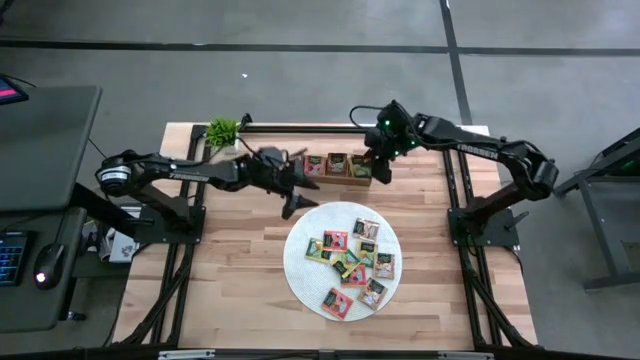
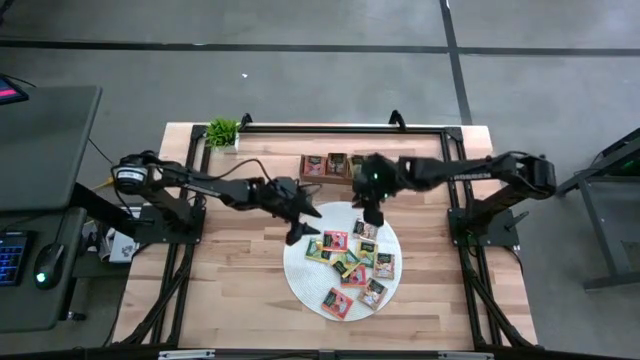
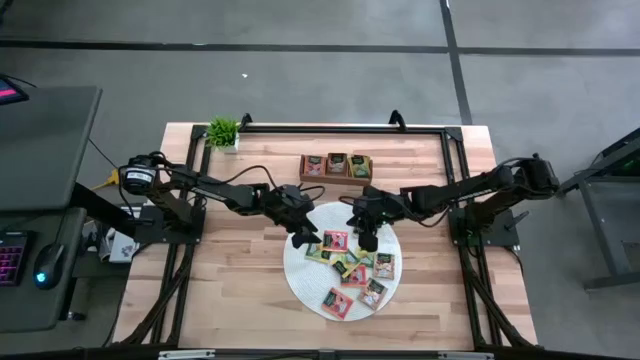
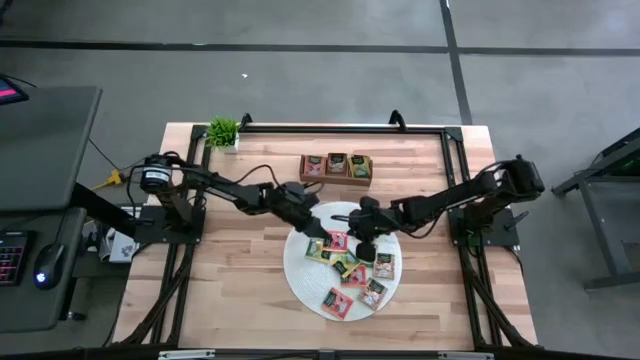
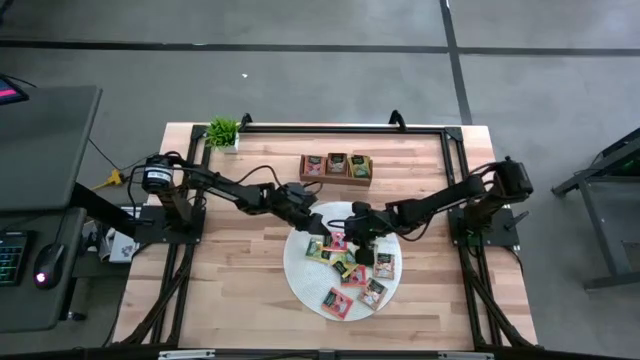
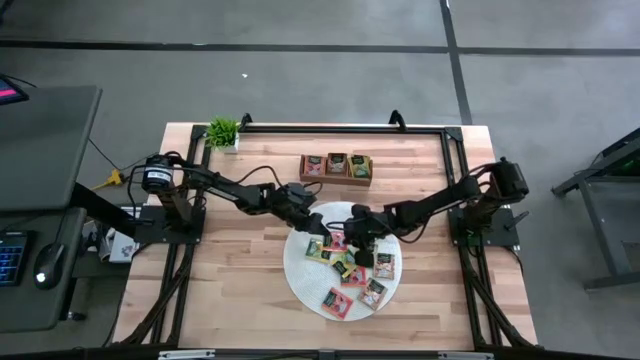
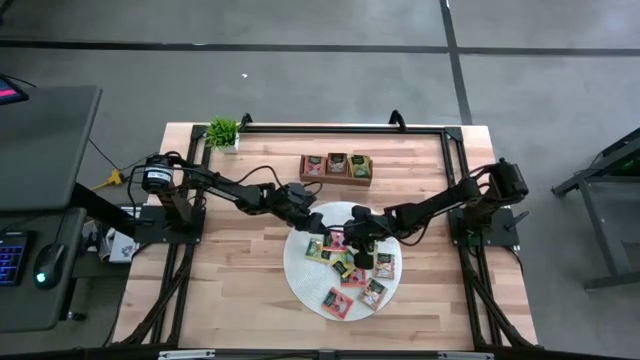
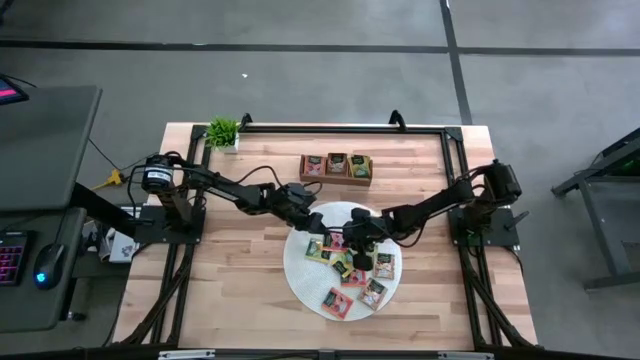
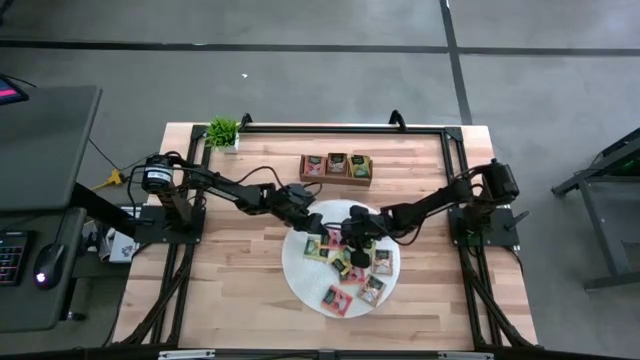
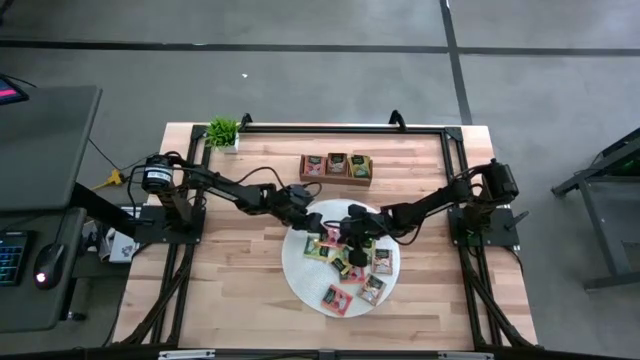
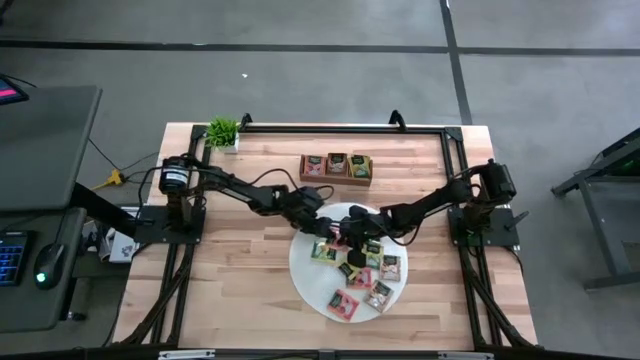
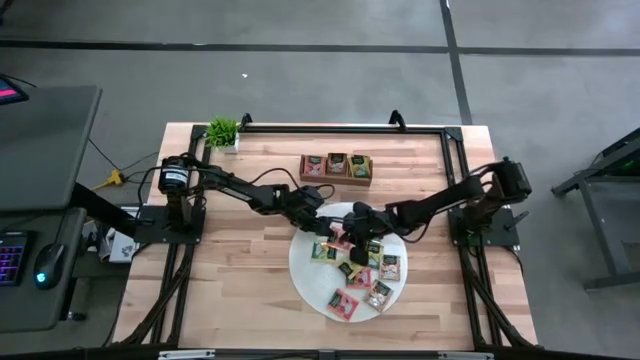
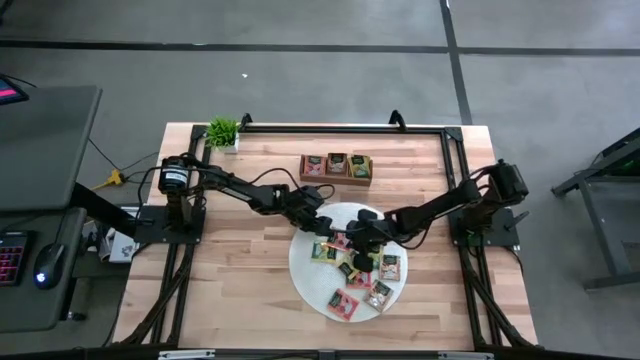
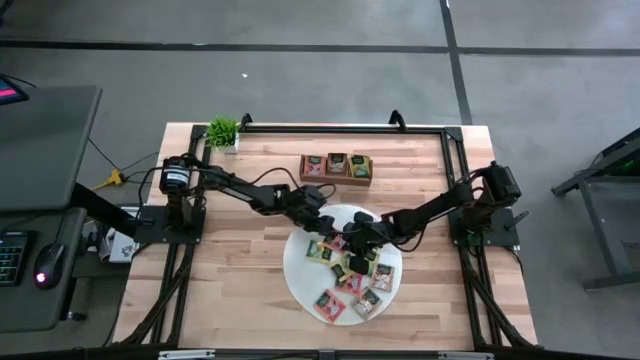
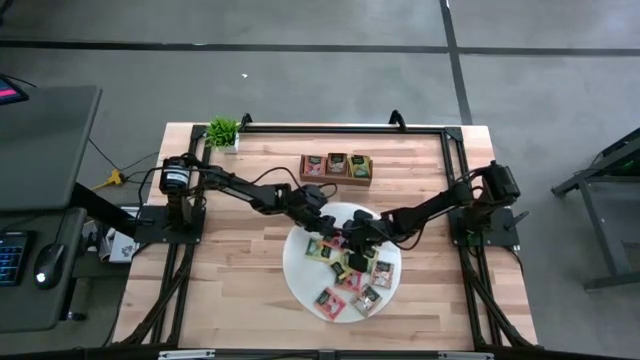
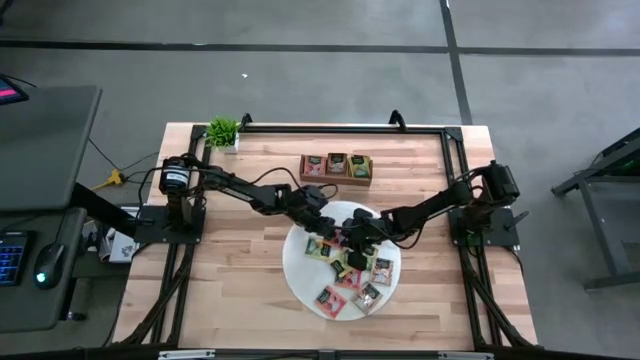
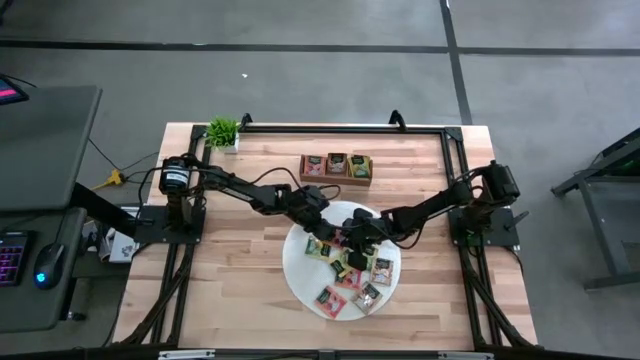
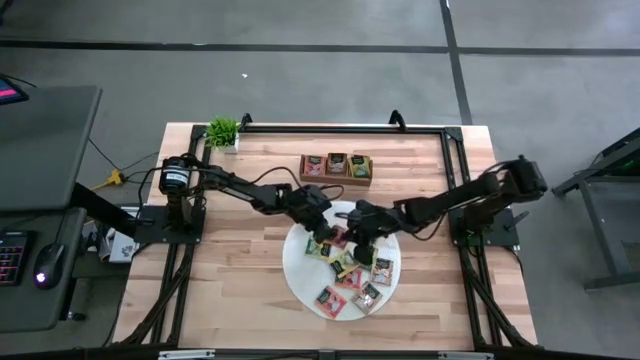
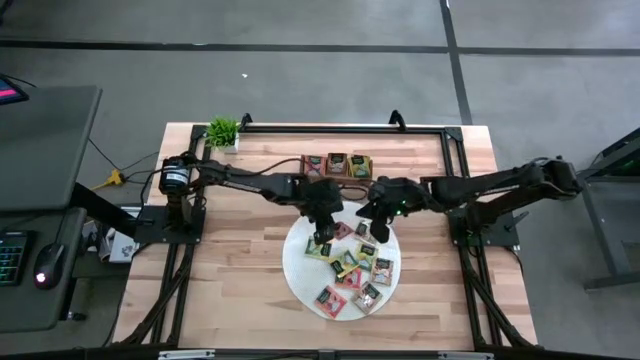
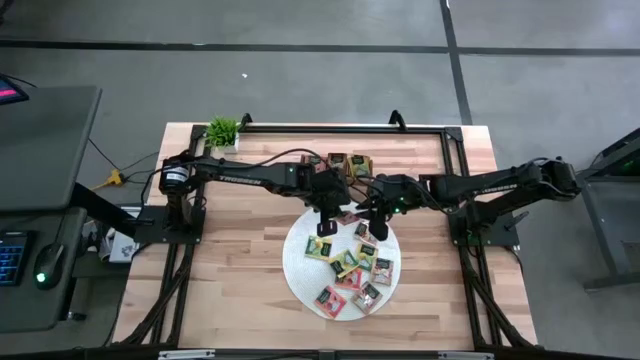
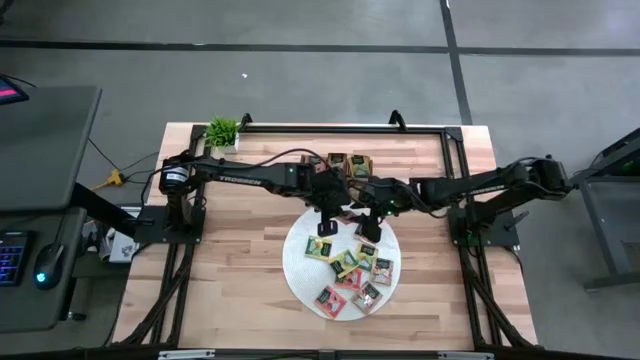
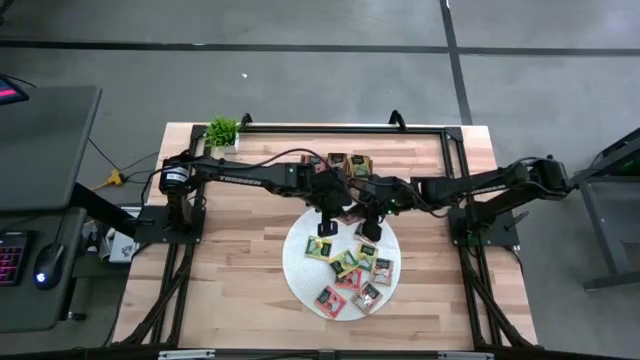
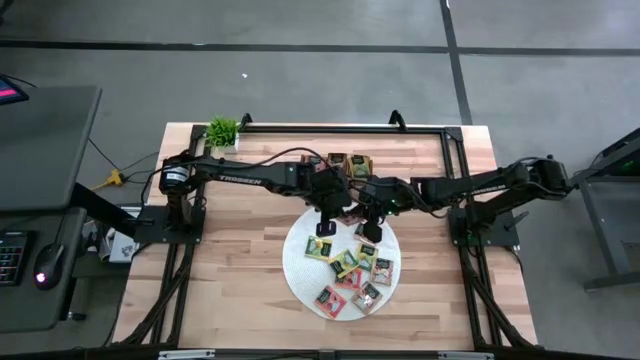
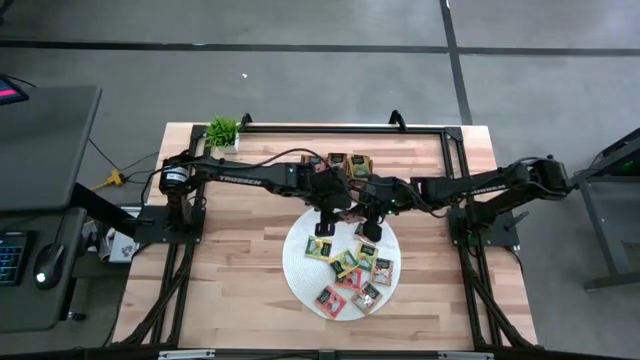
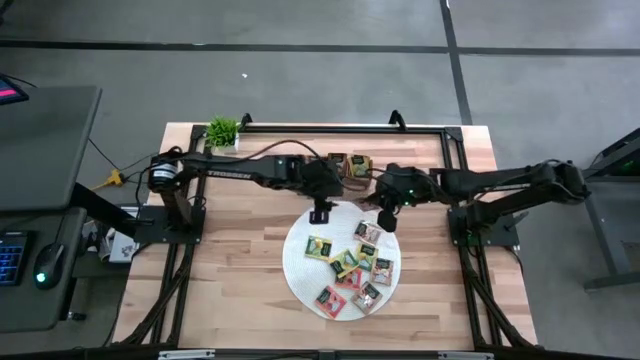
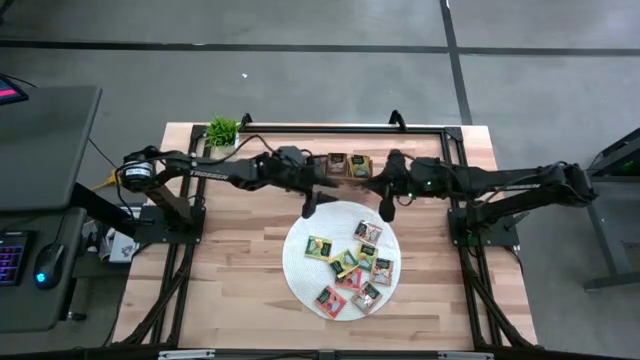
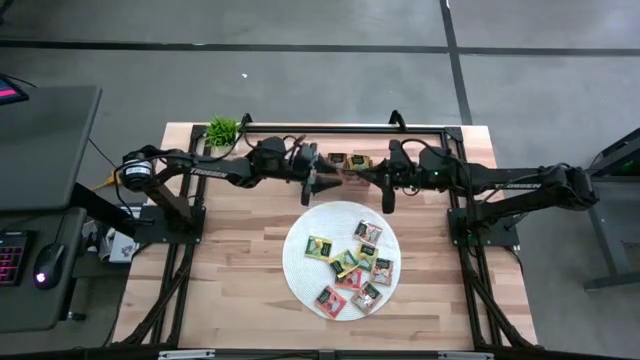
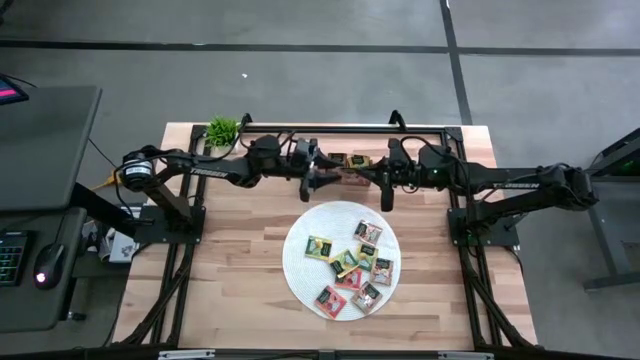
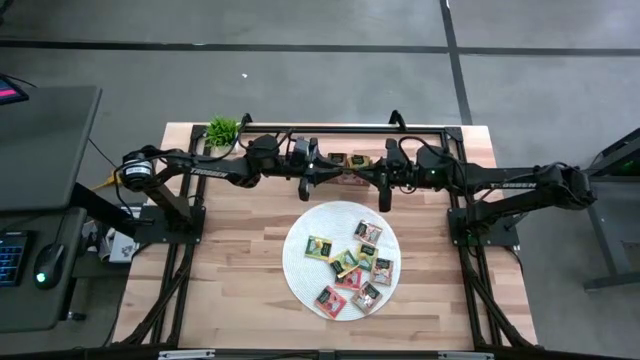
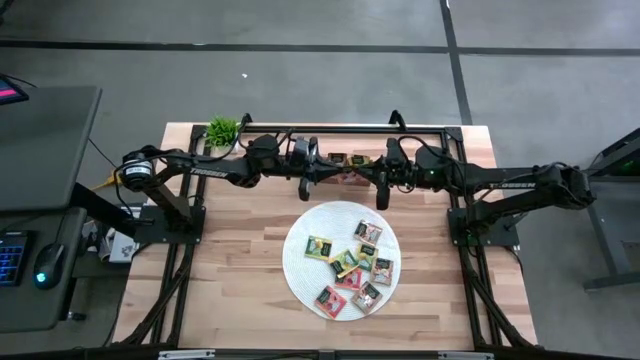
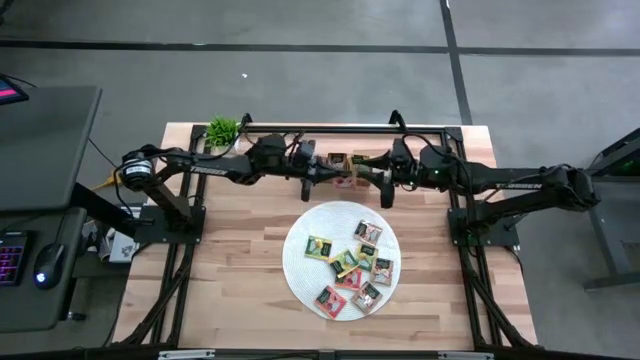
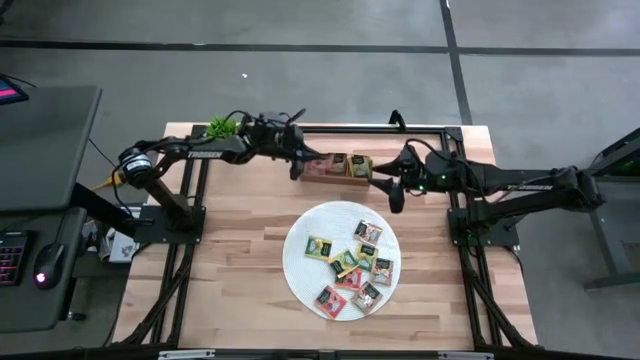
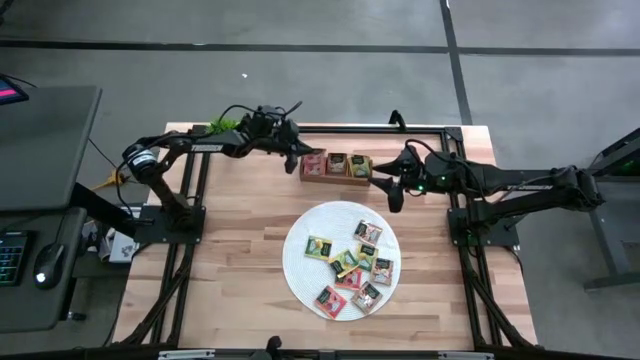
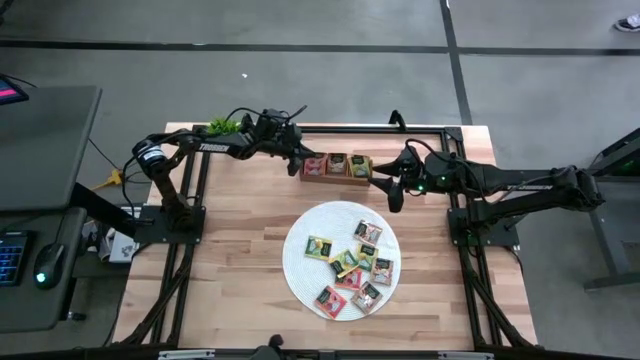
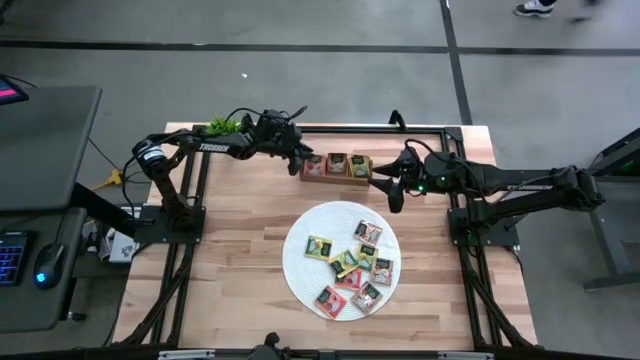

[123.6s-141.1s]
Task: Pick & Place Tea
Put the orange tea bag into the left section of the wooden organizer
